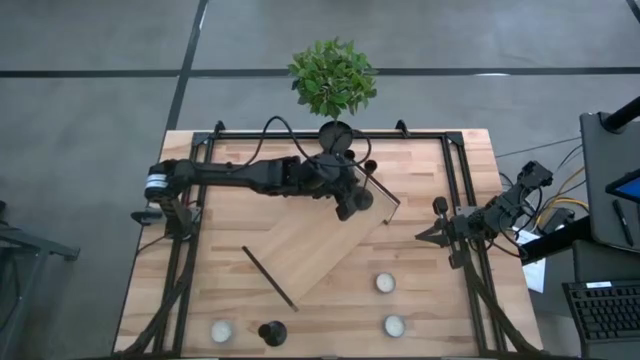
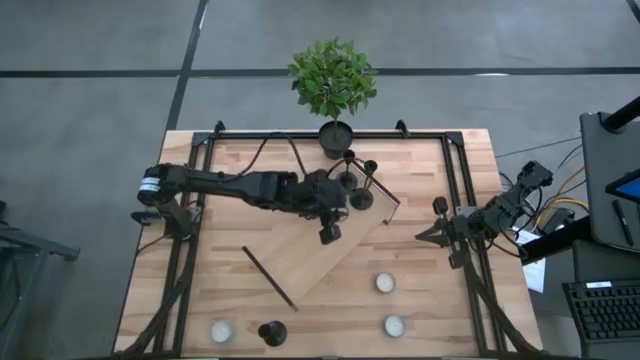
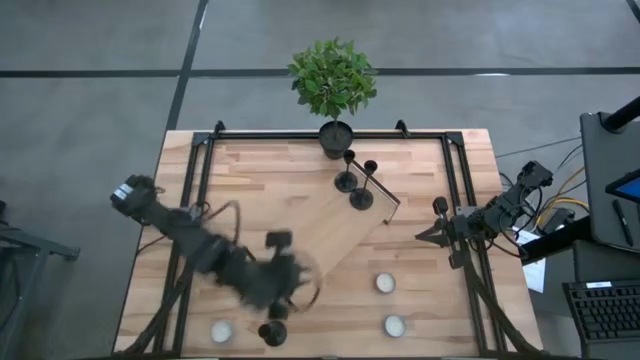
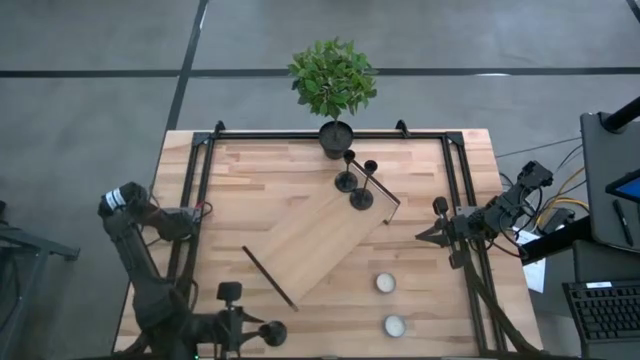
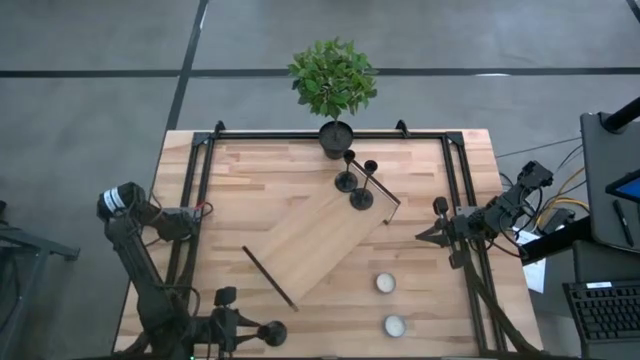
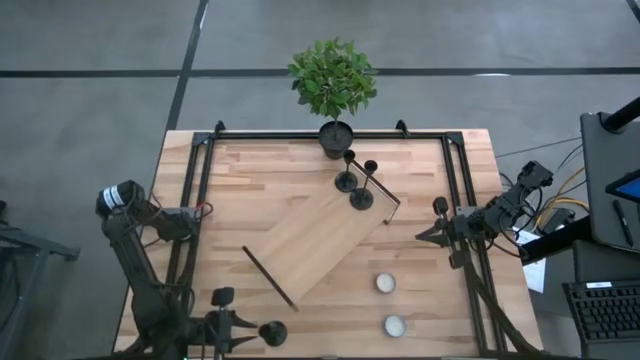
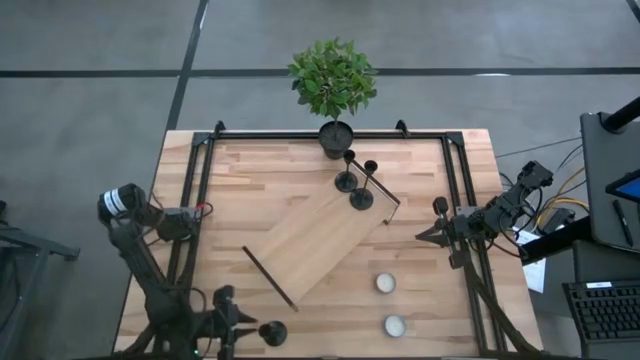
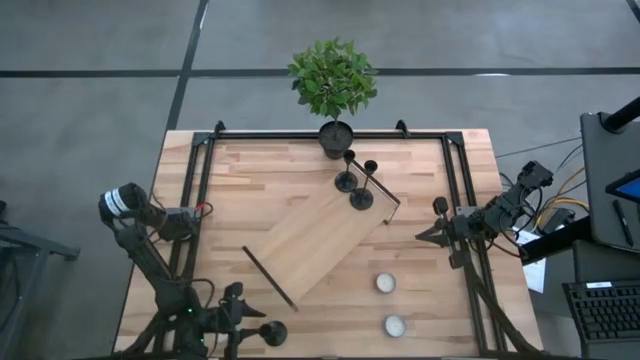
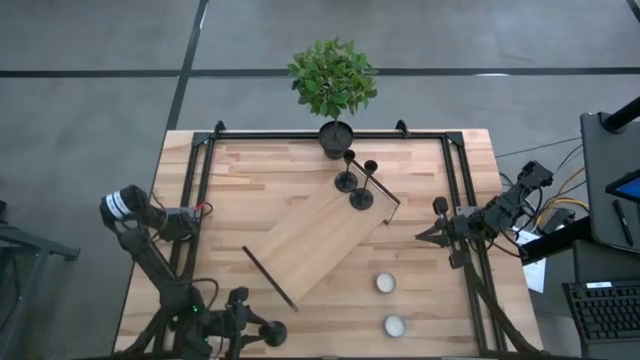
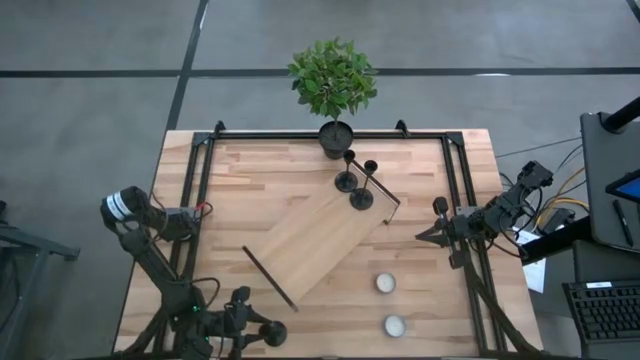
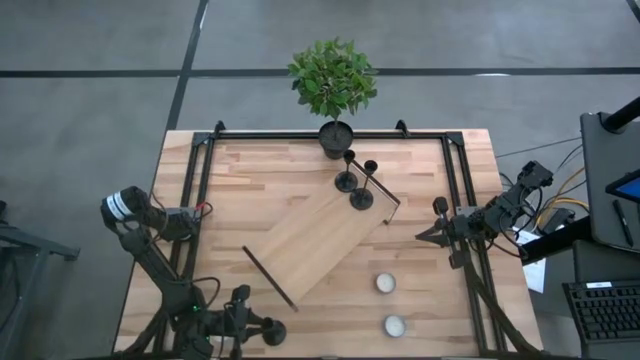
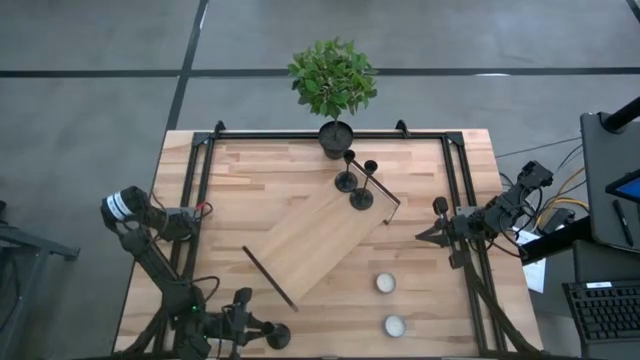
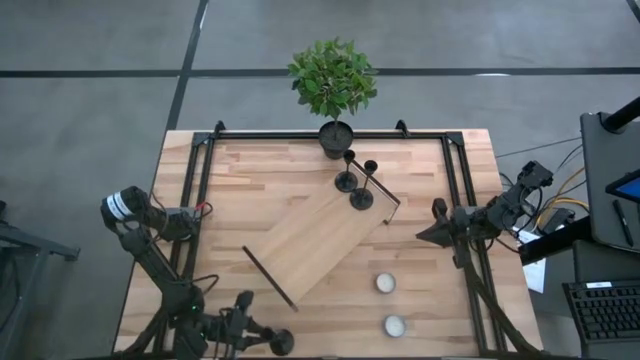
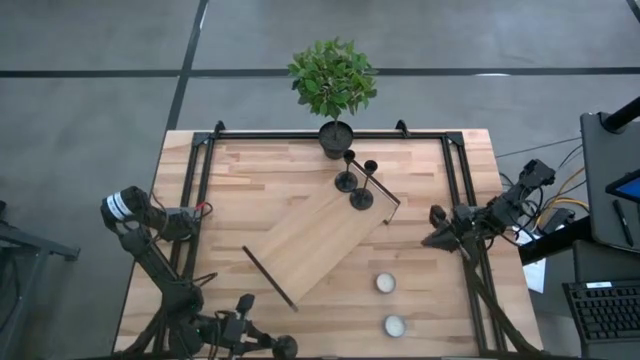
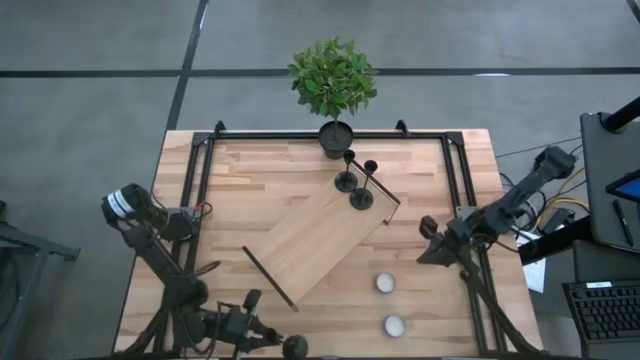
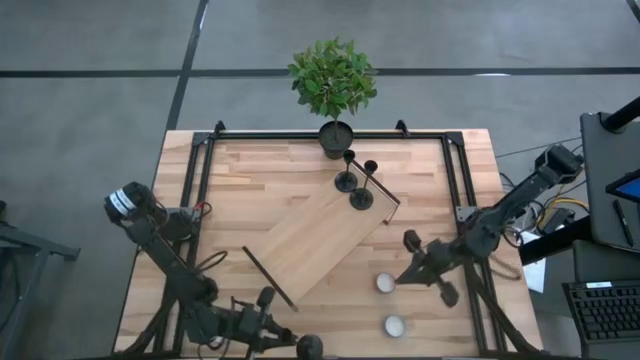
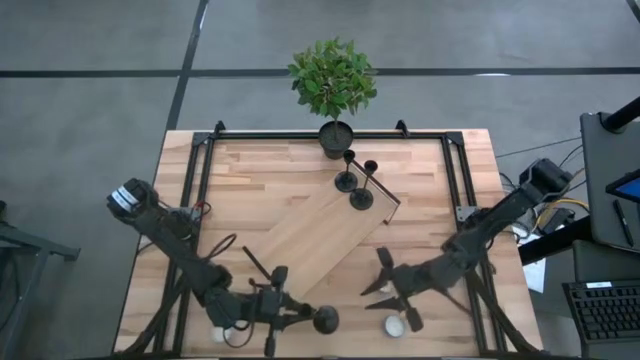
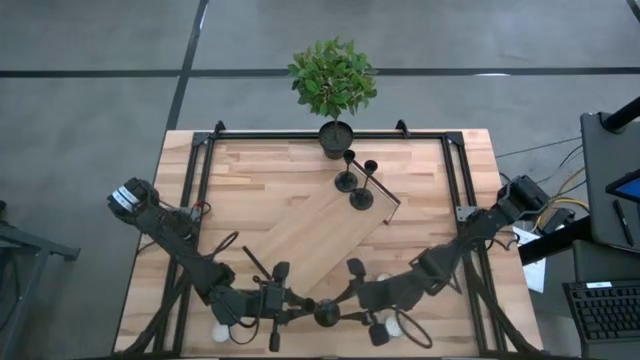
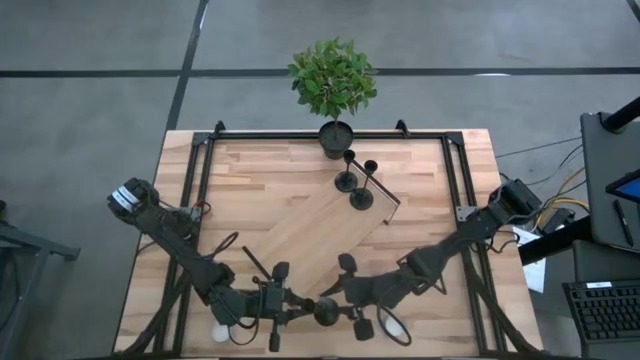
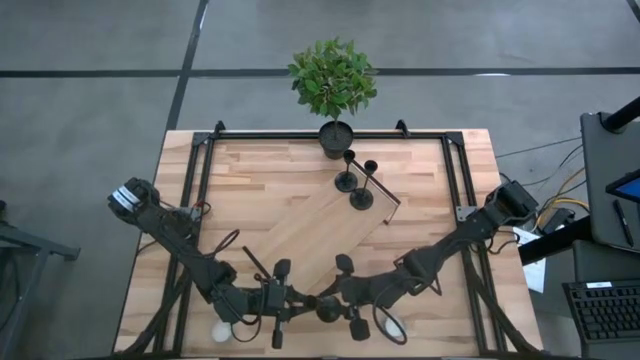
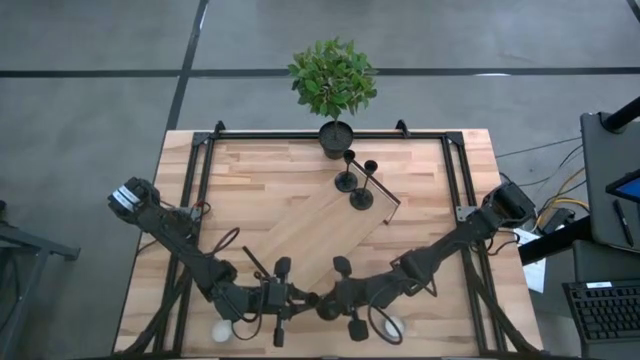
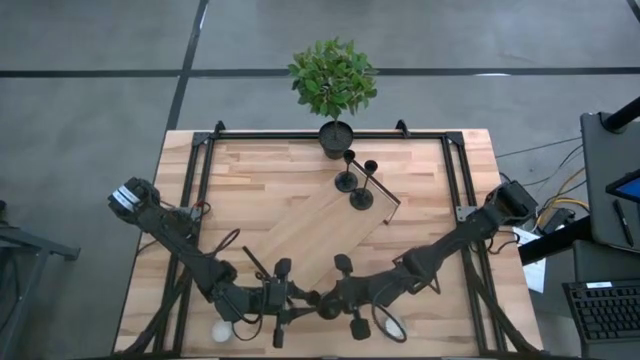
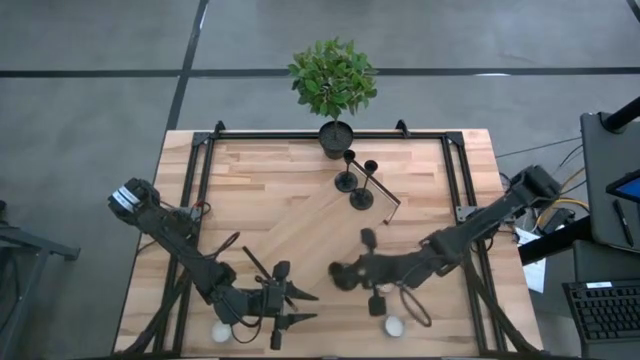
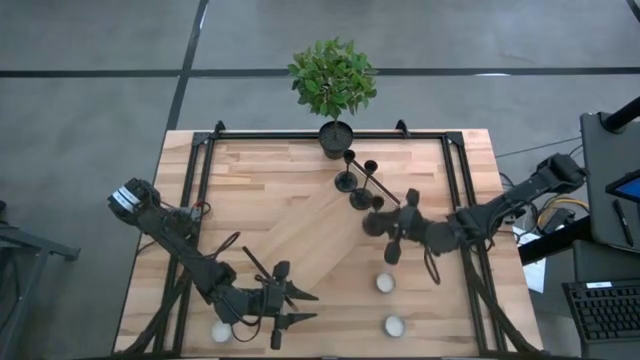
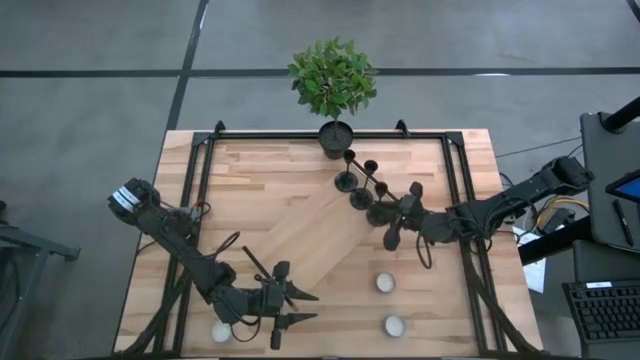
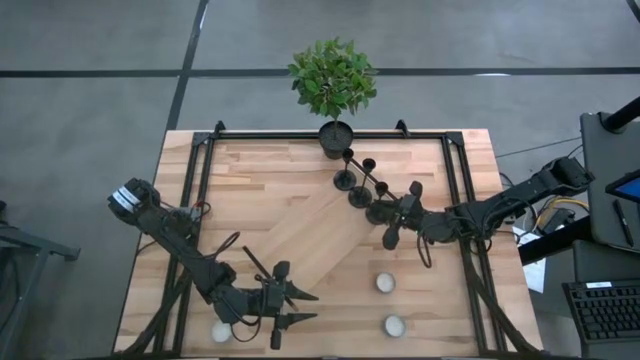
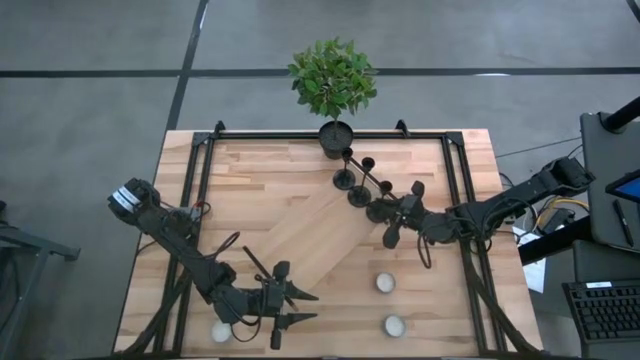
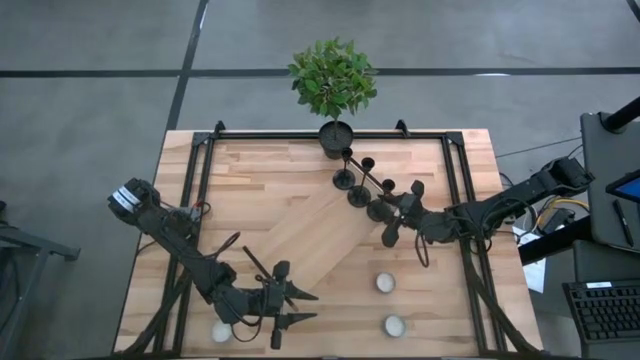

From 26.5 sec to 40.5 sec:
Task: Pick & Place candle stick holders
Put the black candle holder on the shelf aligned with the other candle holder

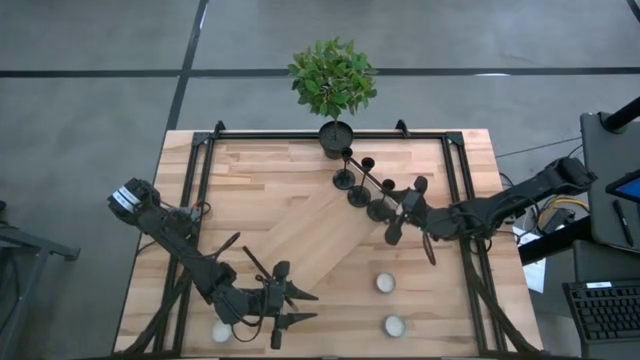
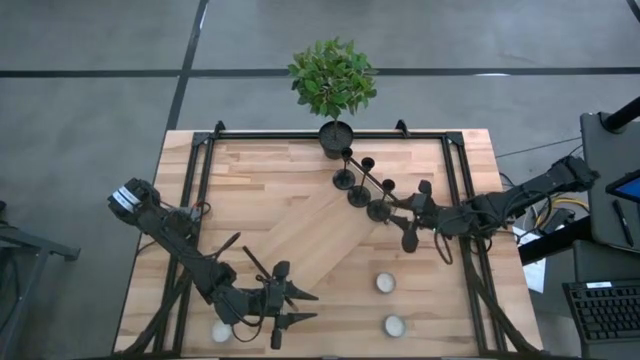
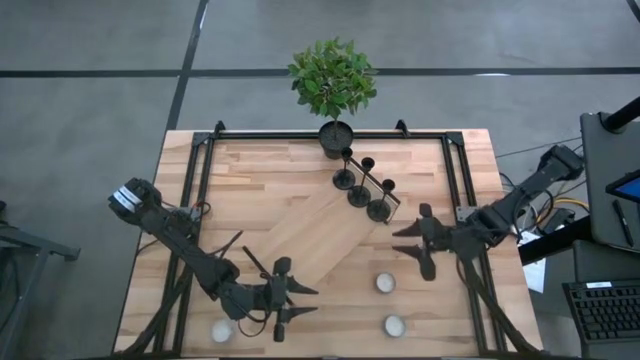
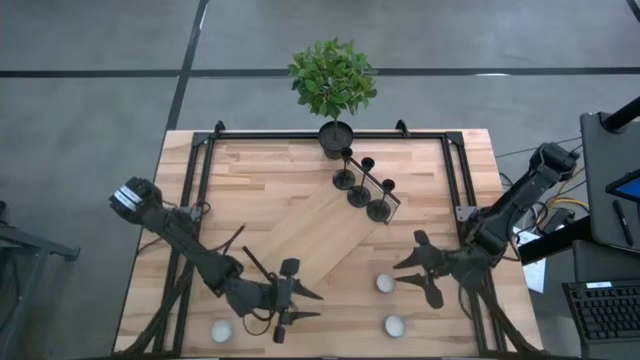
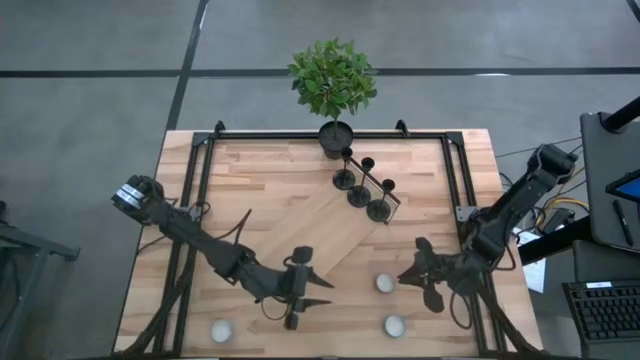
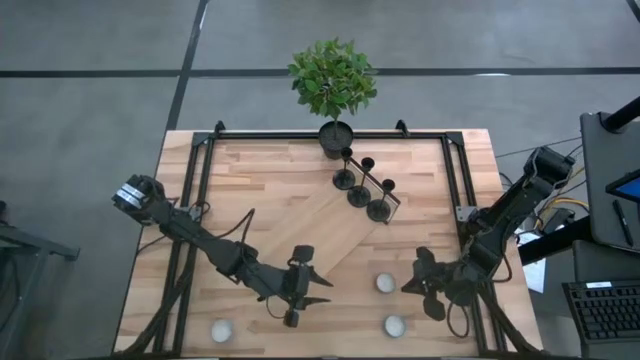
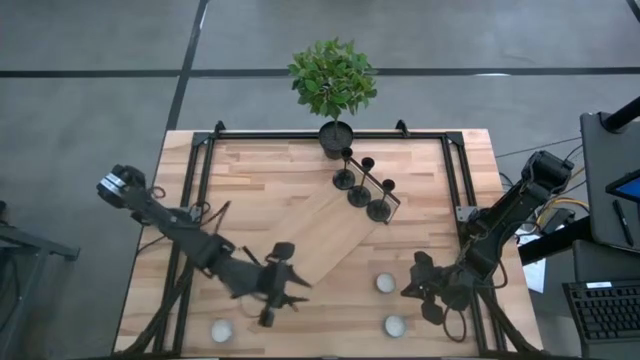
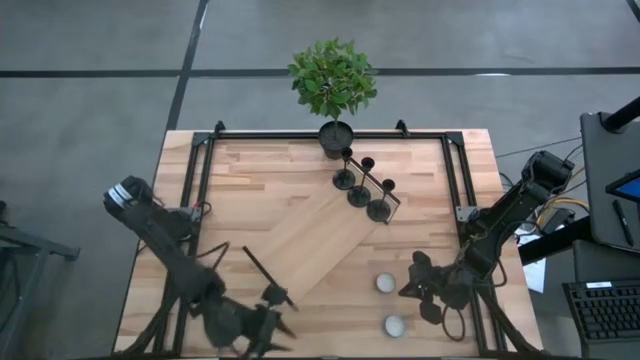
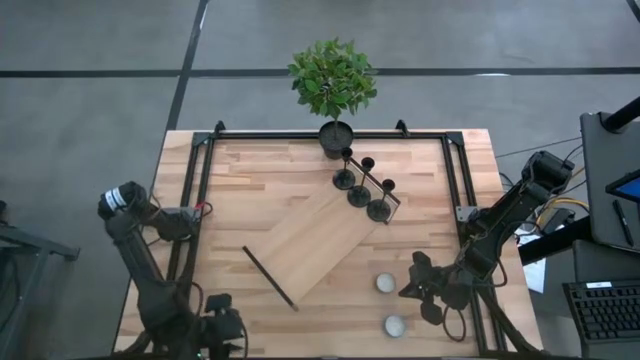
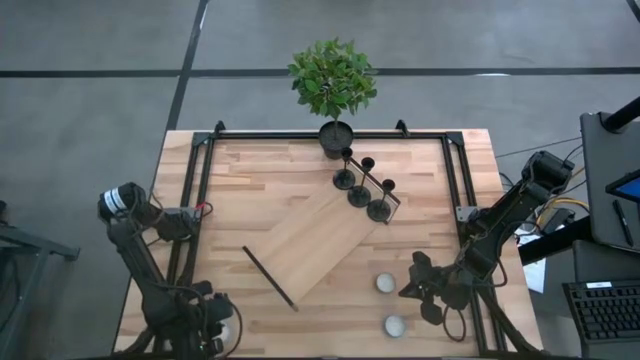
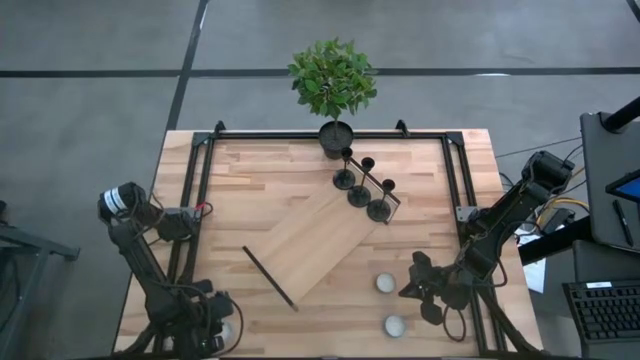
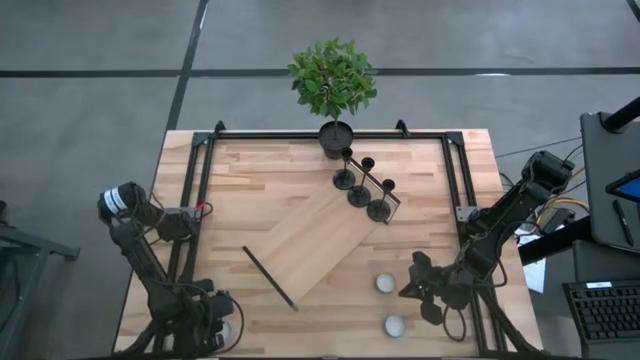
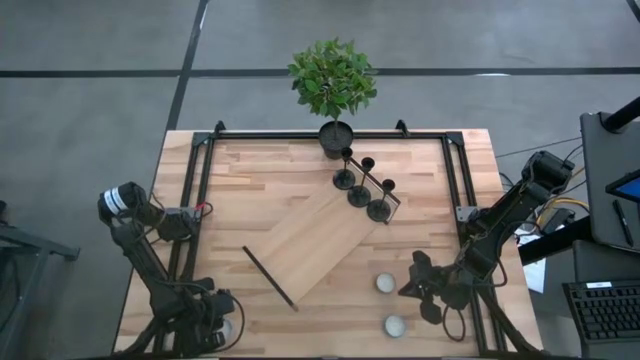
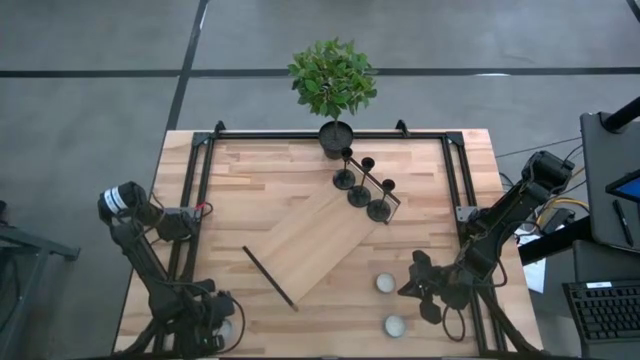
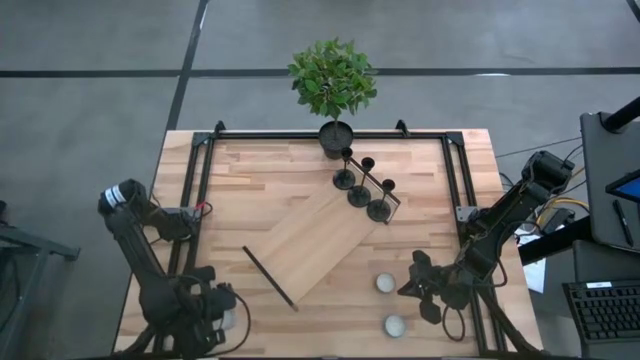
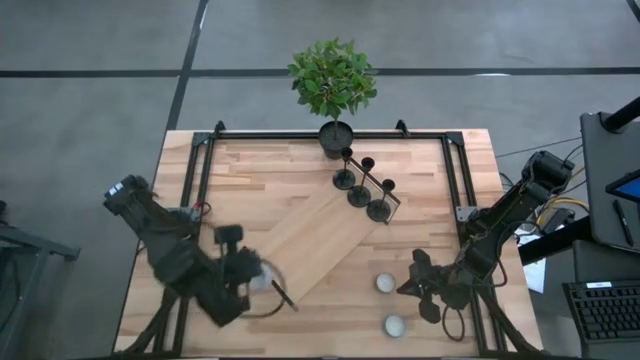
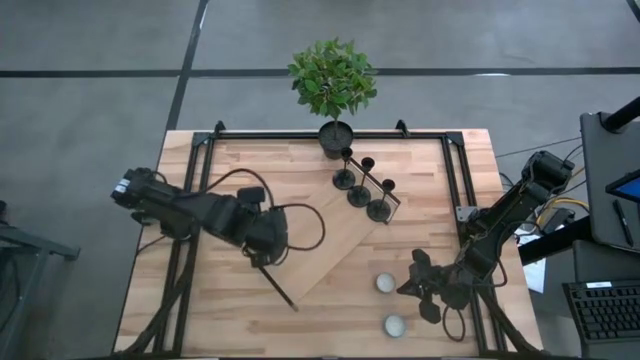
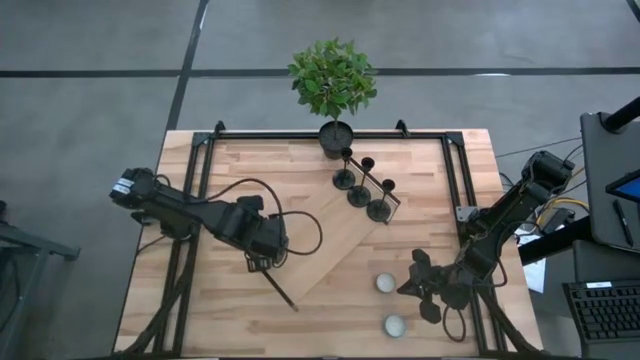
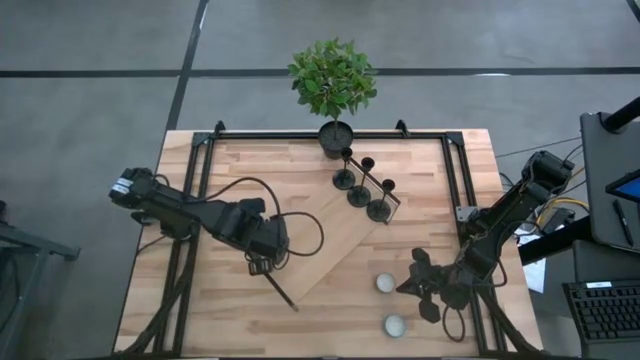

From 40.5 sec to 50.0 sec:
Put the red scented candle on the shelf
